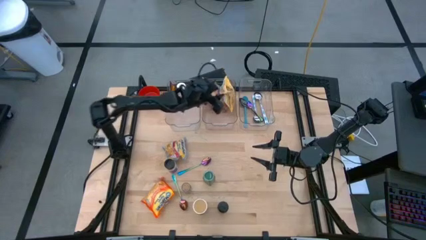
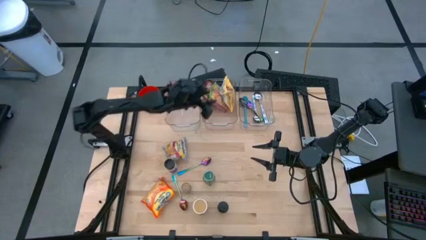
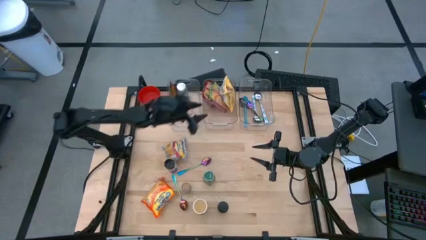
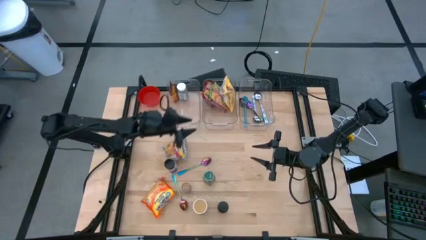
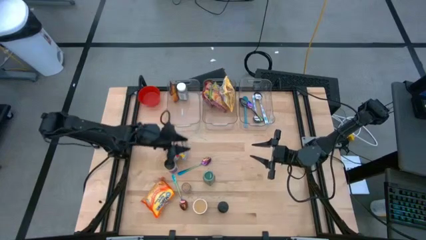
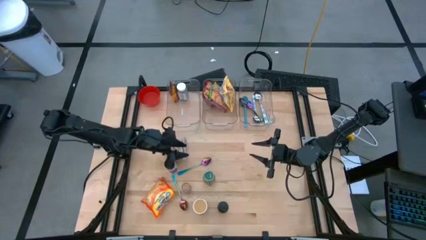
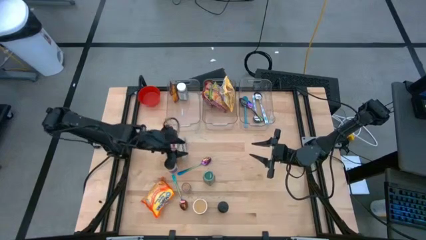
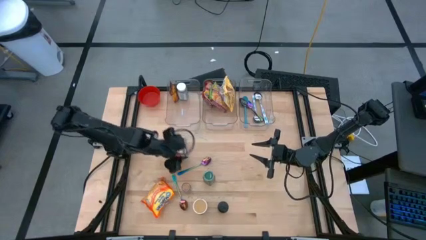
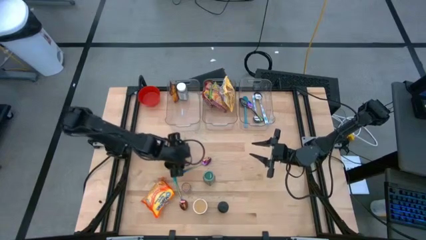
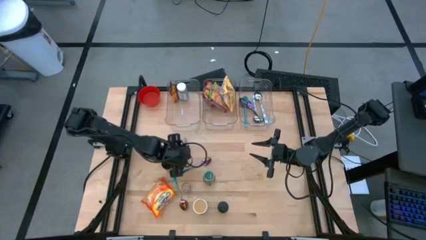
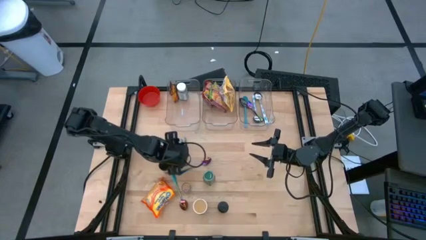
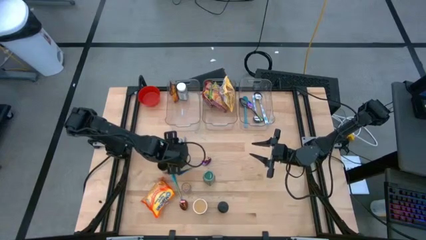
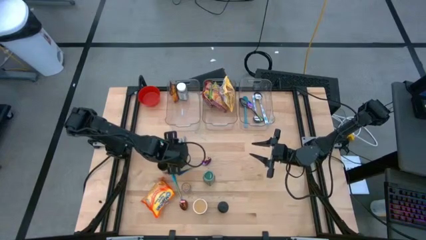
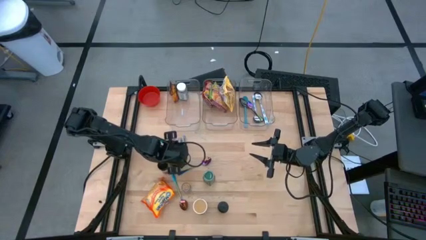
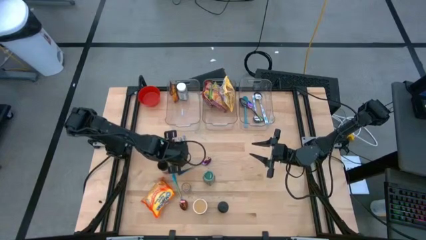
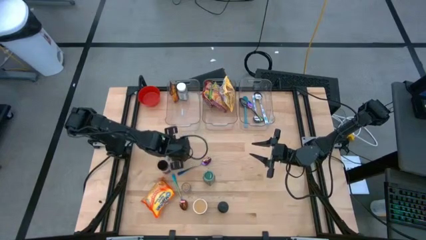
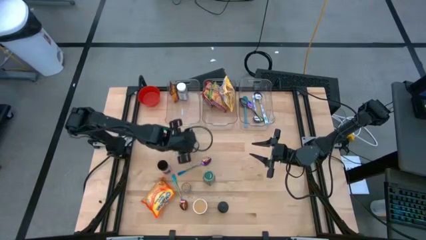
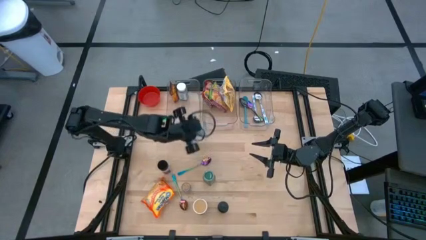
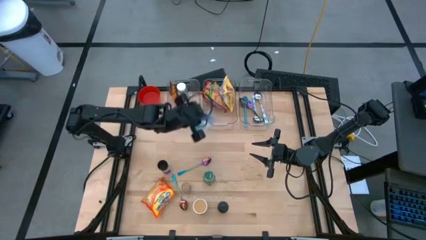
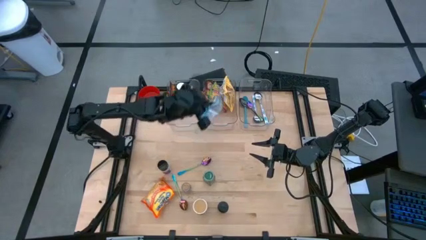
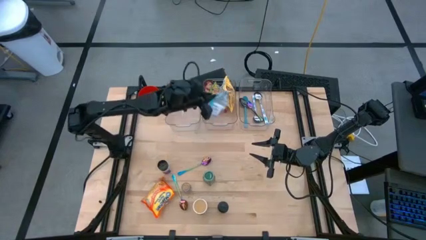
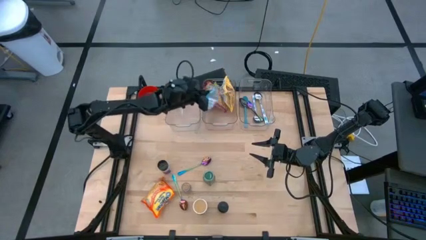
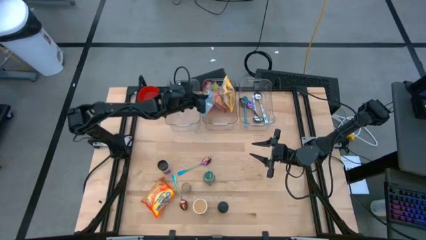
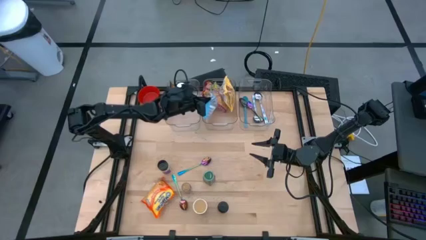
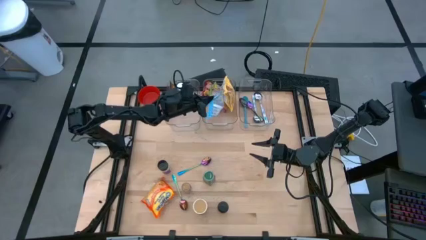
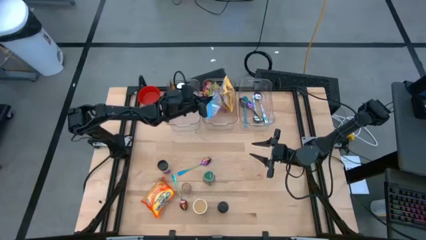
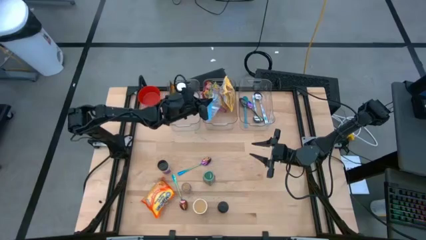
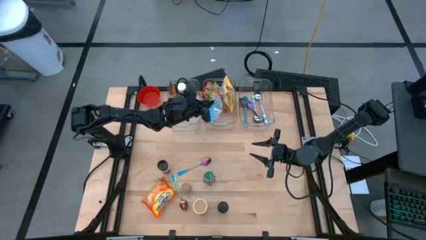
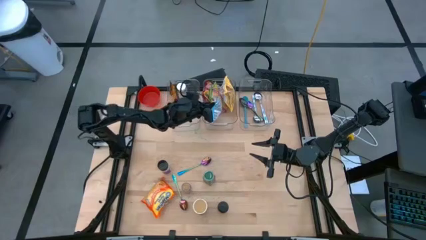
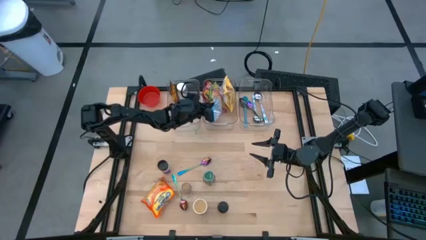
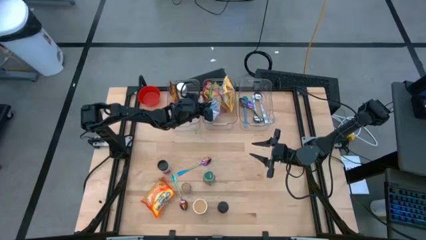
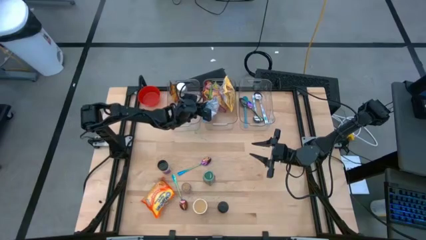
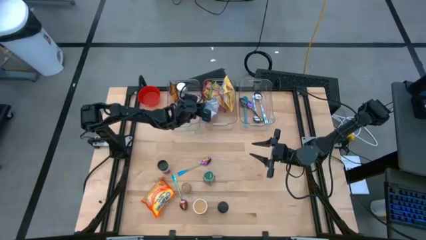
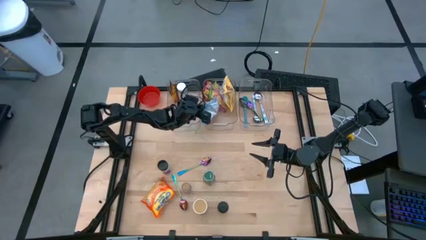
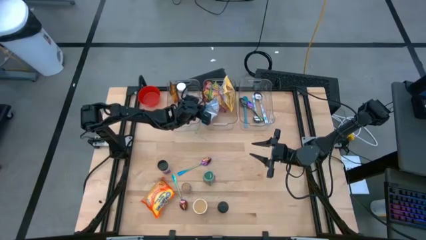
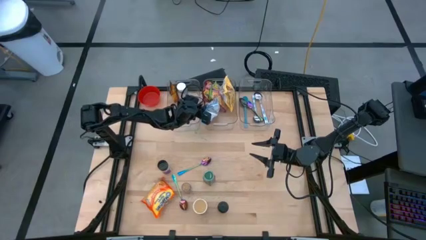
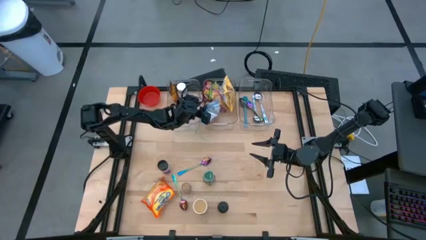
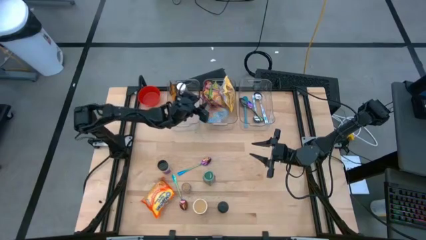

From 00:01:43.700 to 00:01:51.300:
Task: Pick & Place Food Item
Put the blue noodle pack into the middle transparent bin

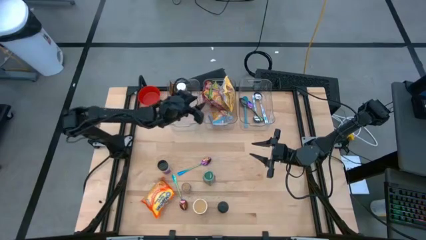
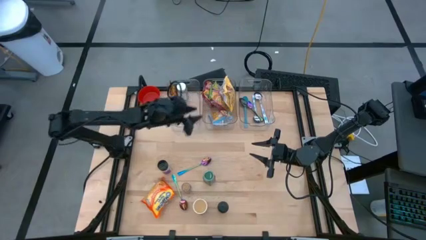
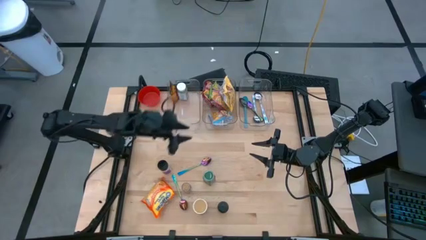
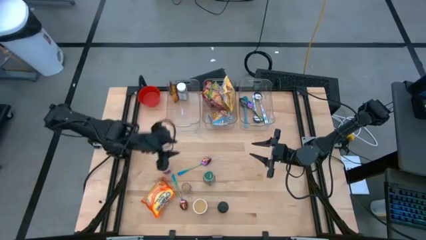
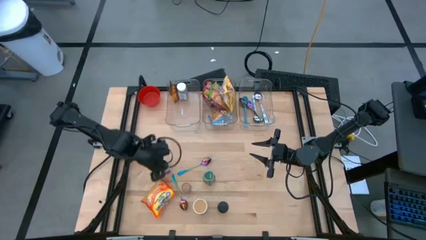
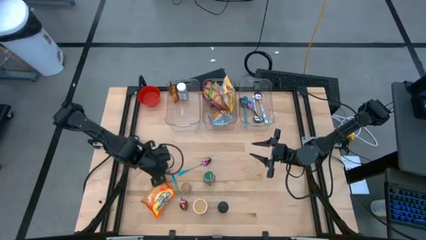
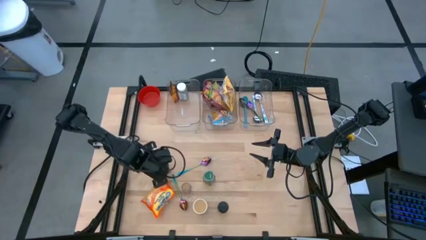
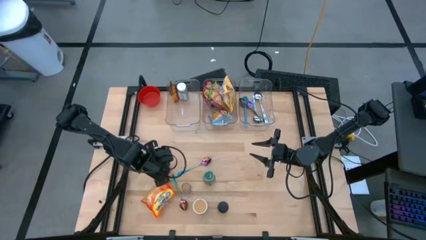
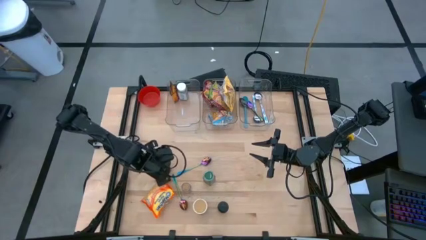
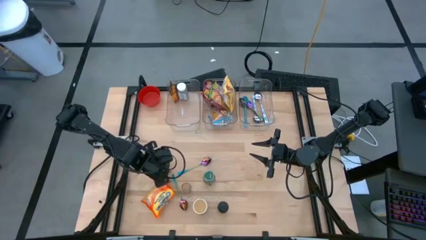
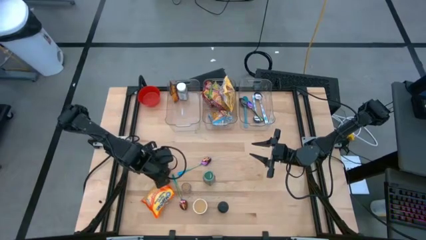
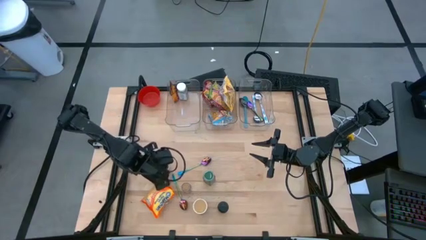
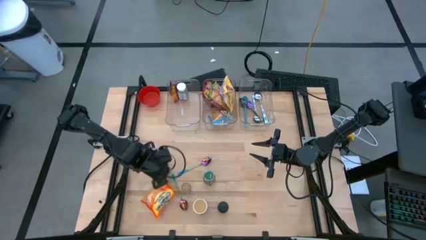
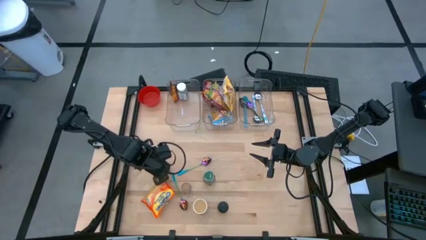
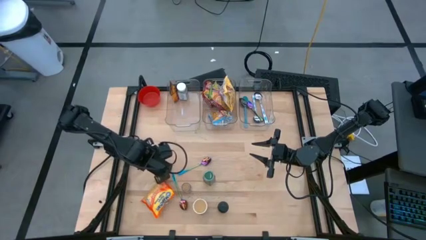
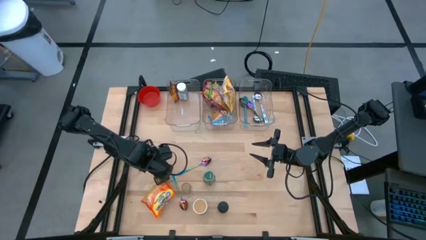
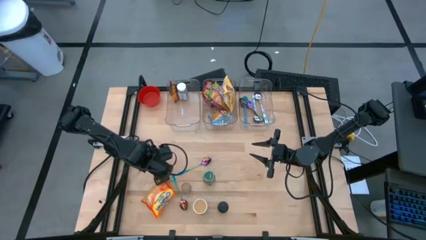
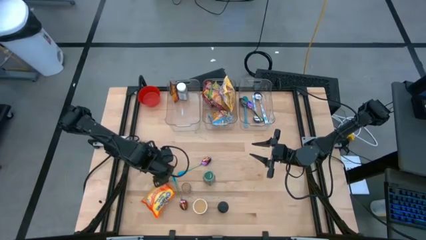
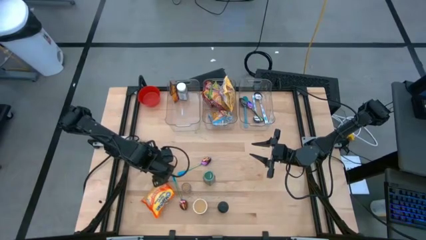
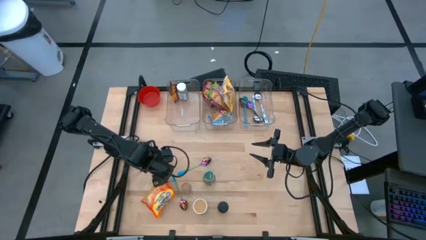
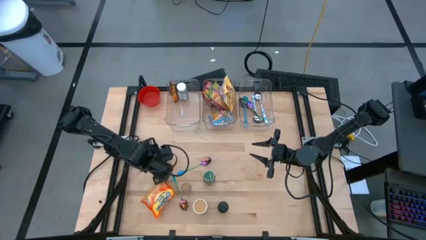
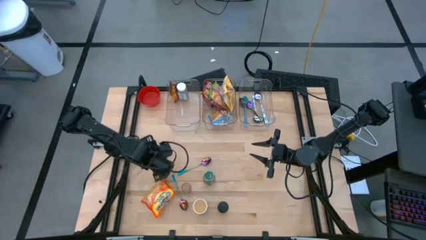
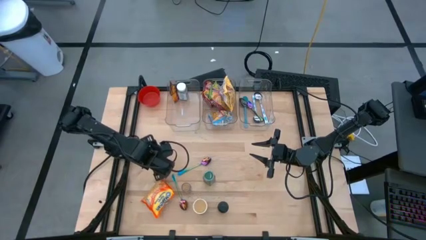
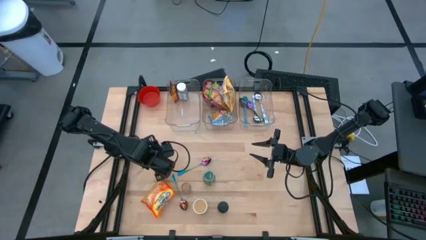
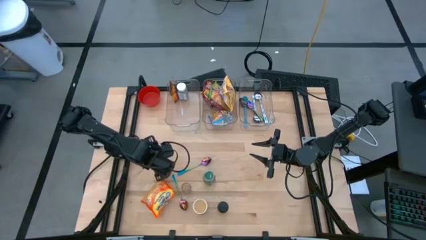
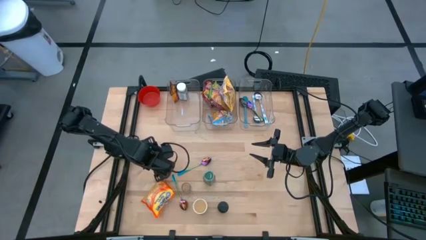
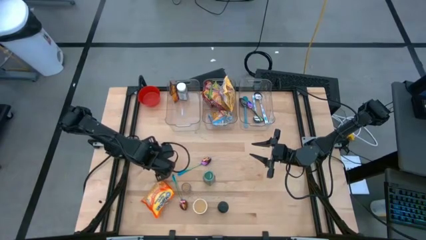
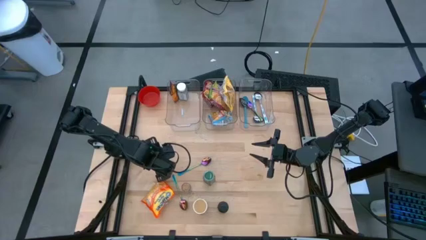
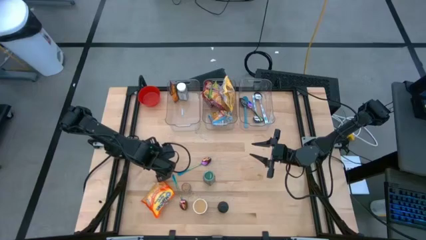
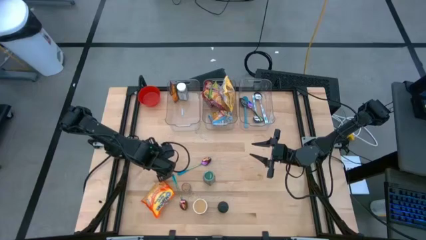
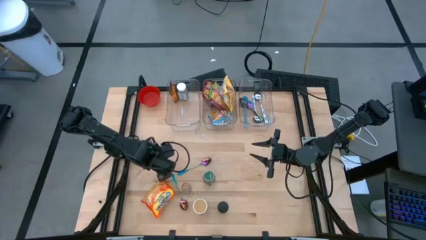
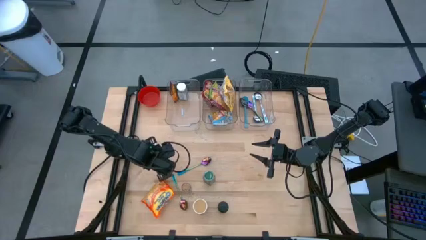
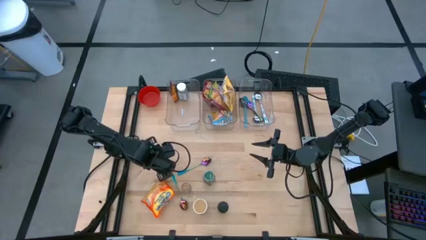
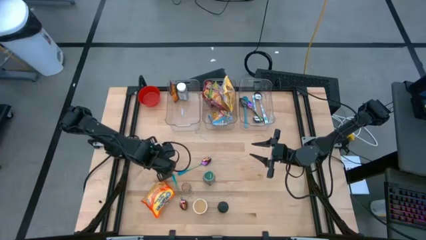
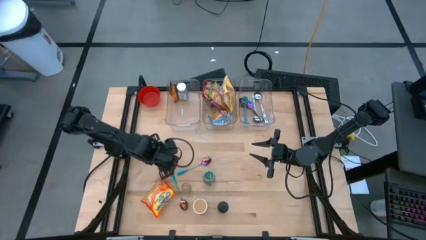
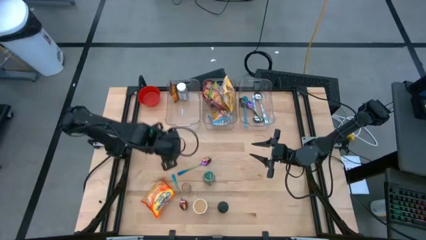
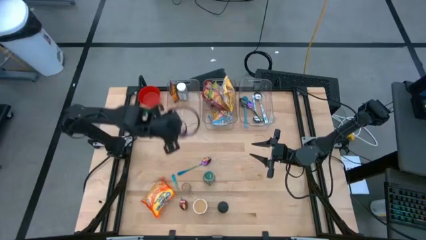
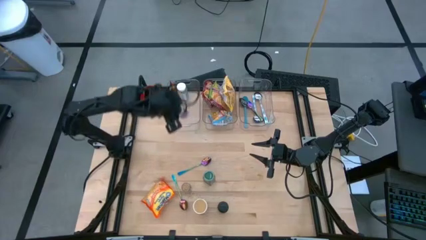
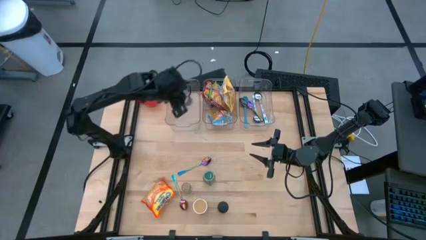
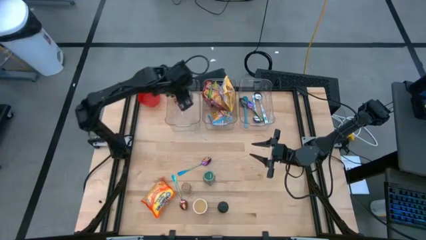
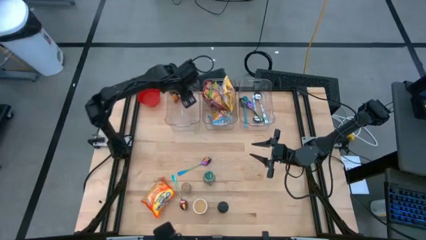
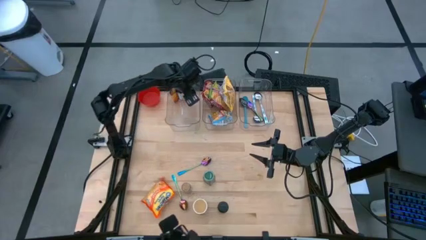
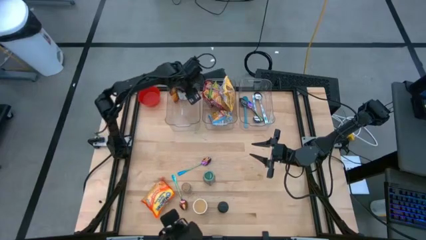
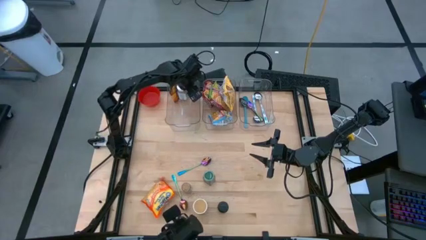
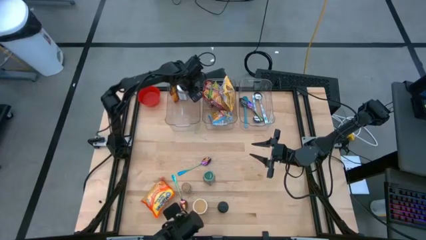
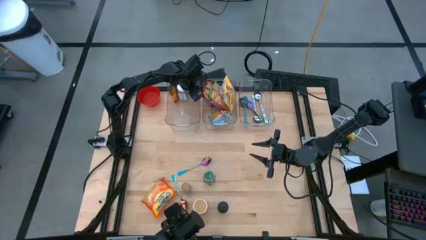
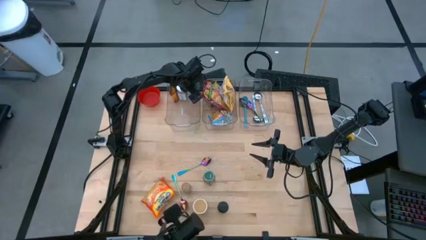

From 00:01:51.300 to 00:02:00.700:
Put the violet seasoning bottle into the left transparent bin
